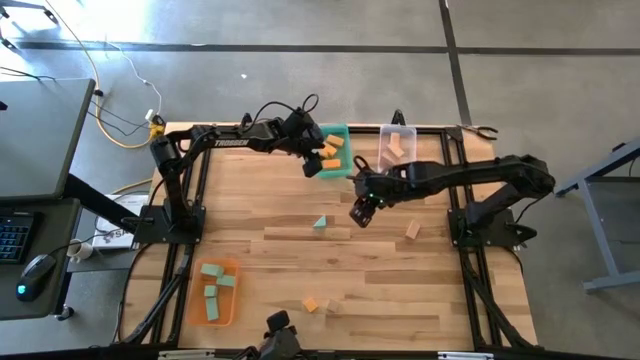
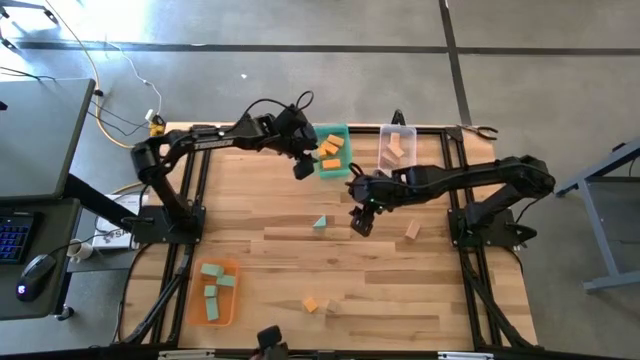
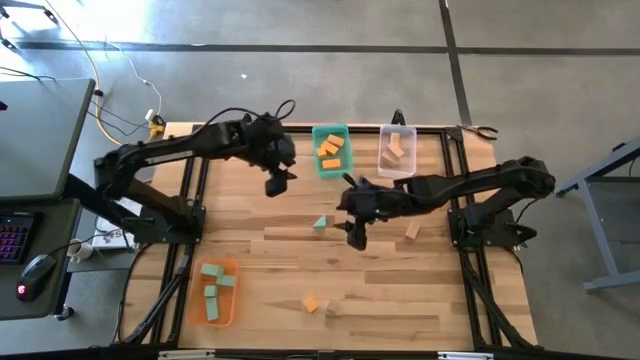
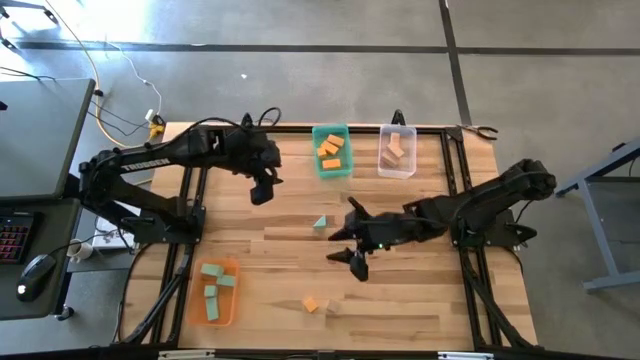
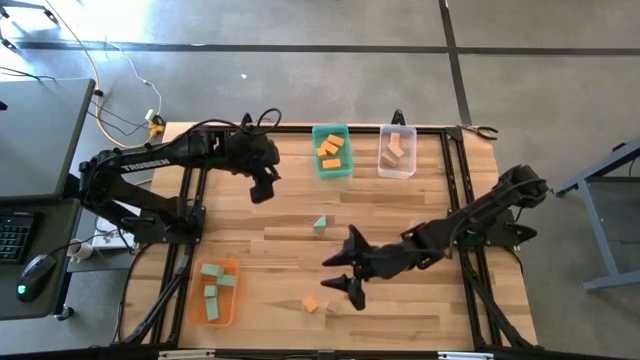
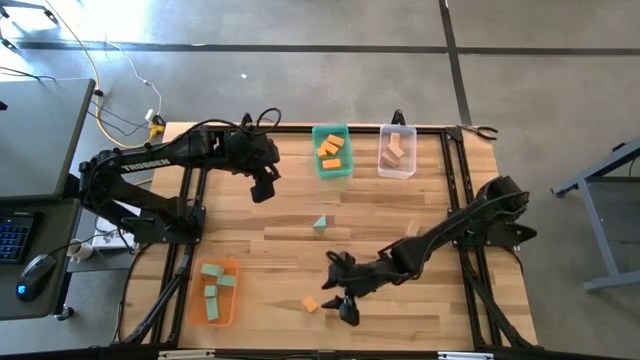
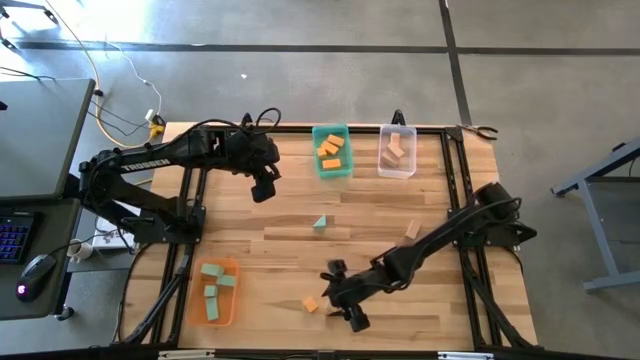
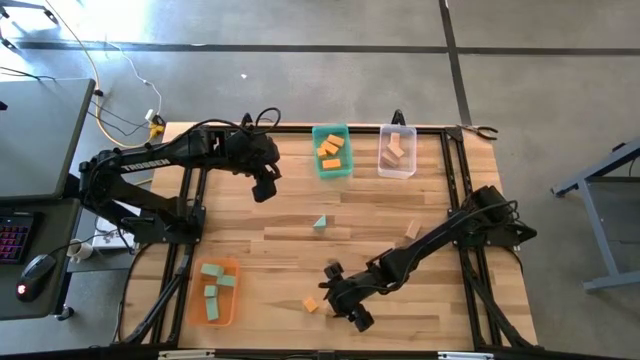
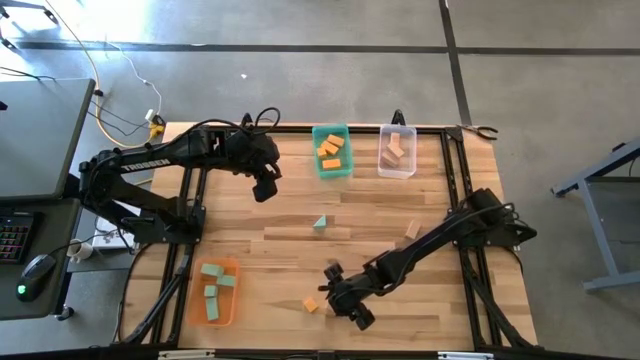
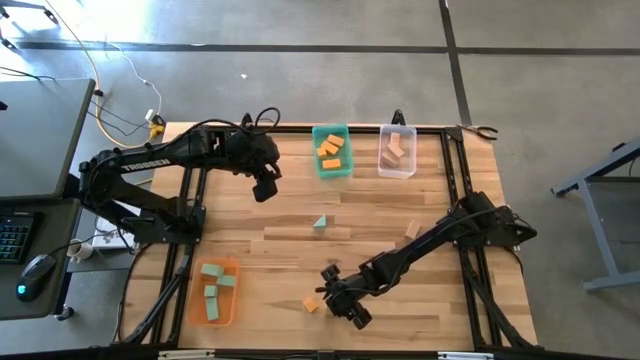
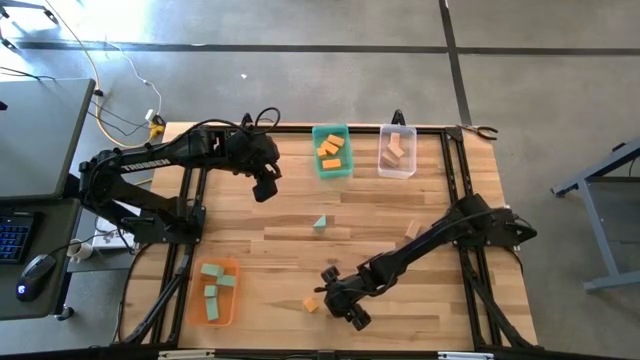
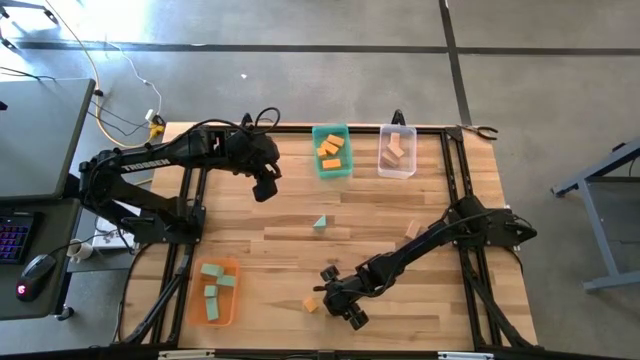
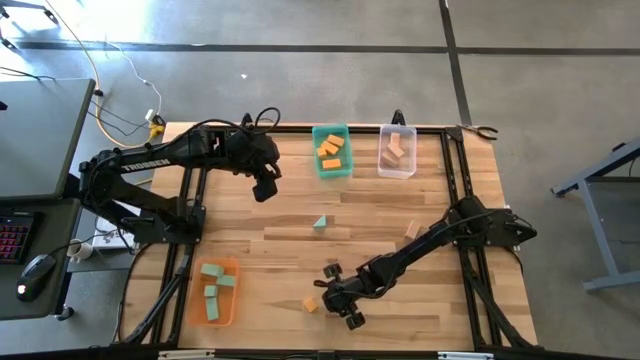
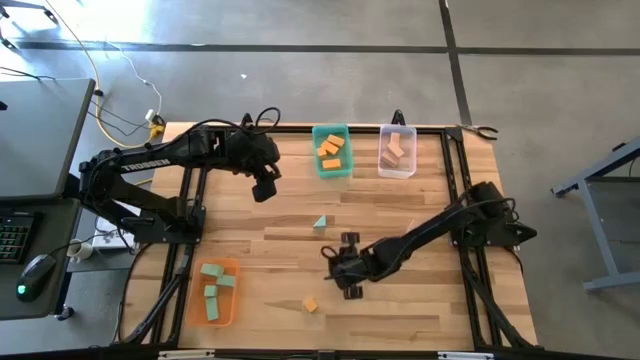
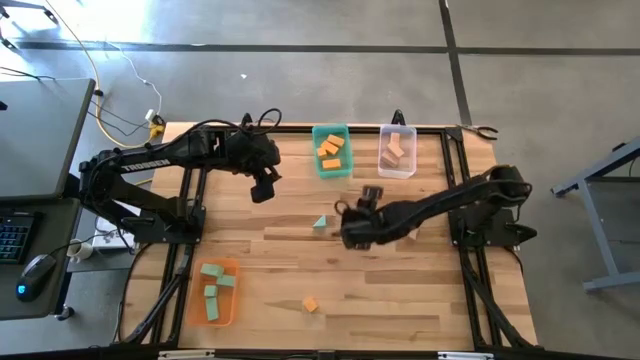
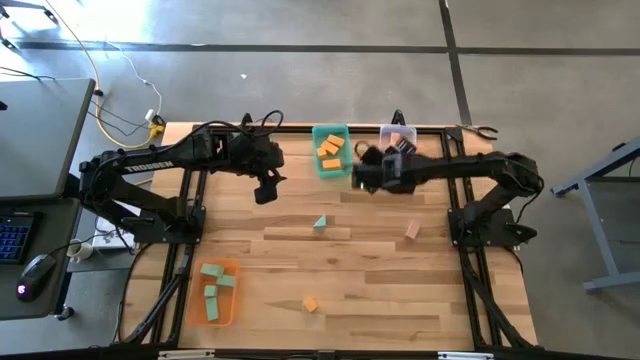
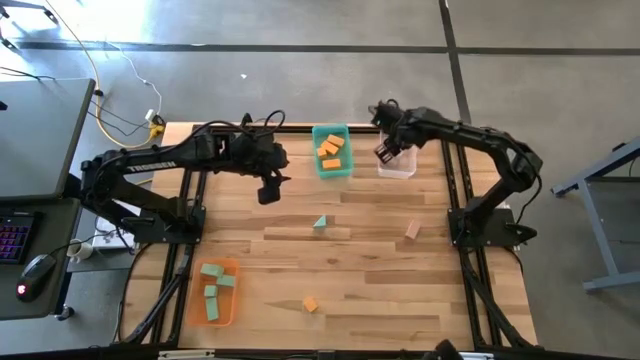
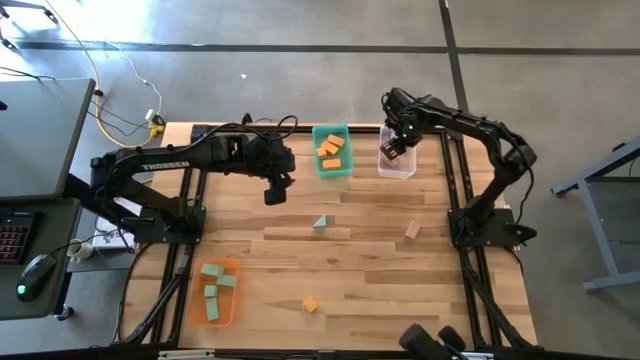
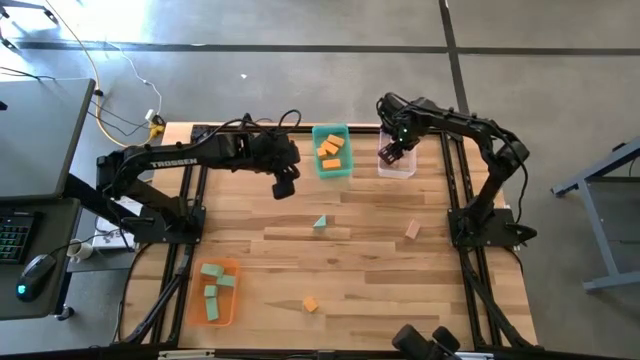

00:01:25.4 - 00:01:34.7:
Task: Sort & place blocks by color
Put the brown block into the transparent bin

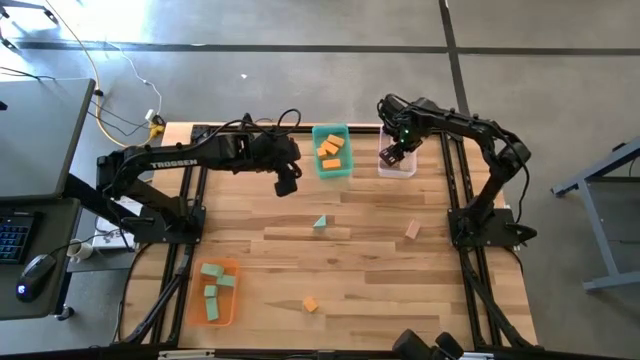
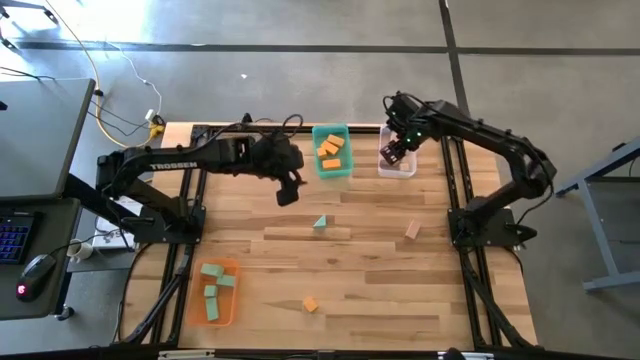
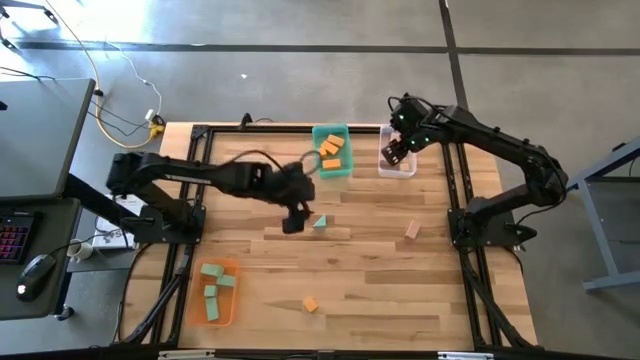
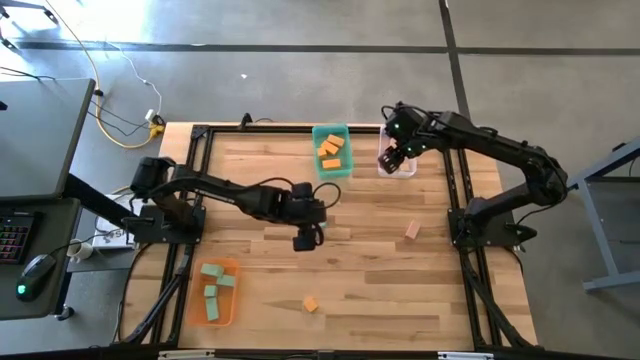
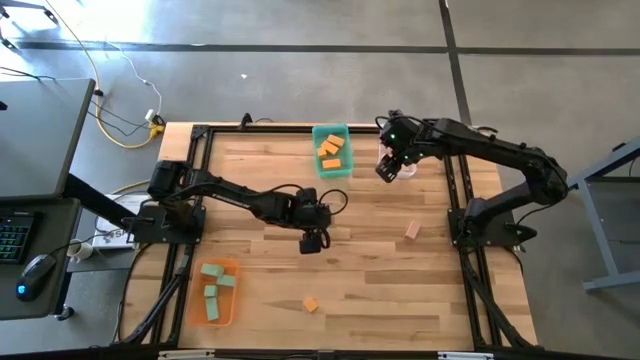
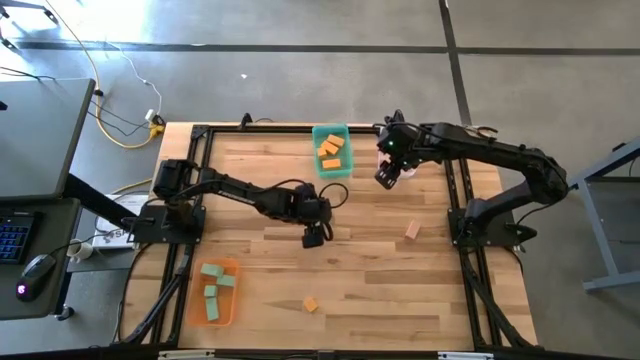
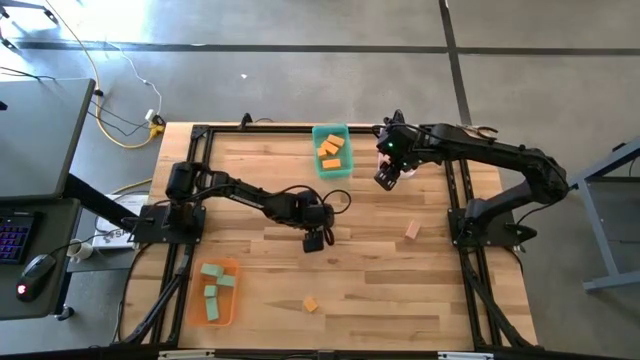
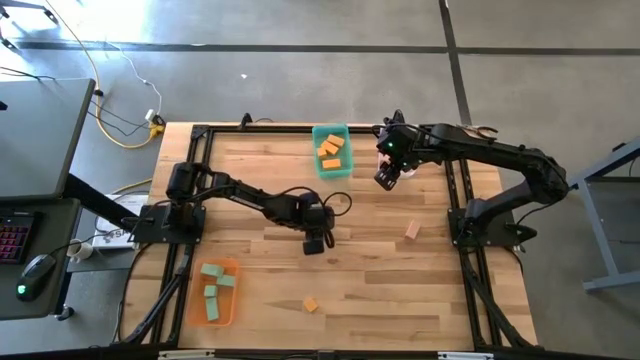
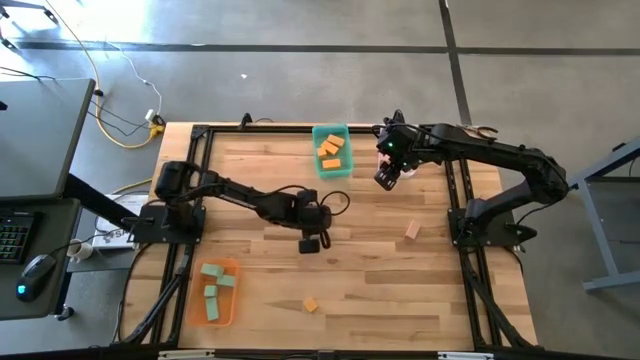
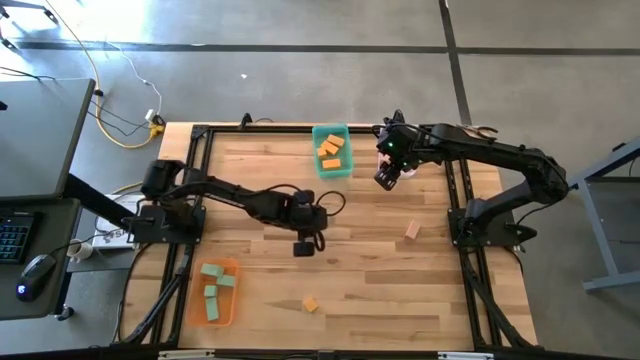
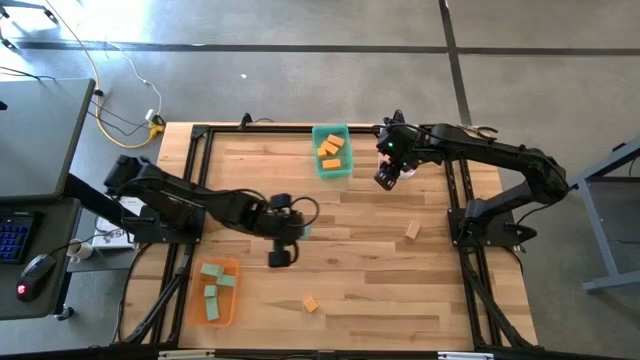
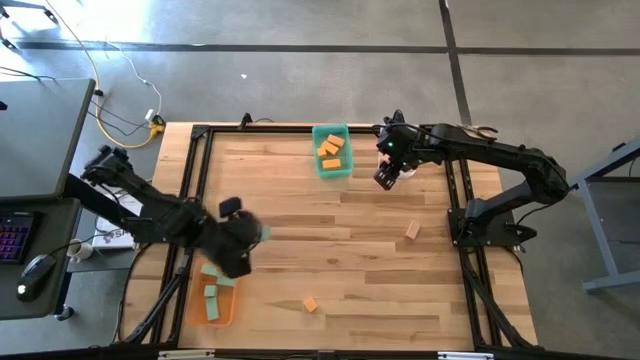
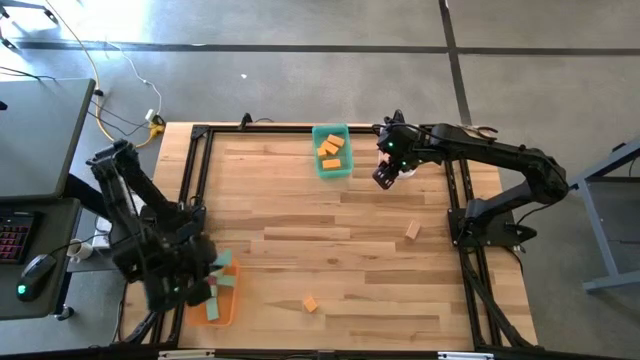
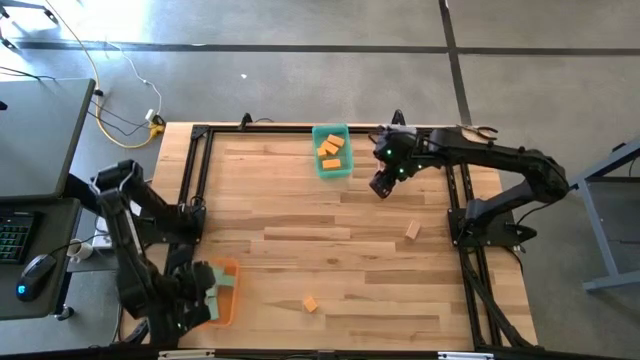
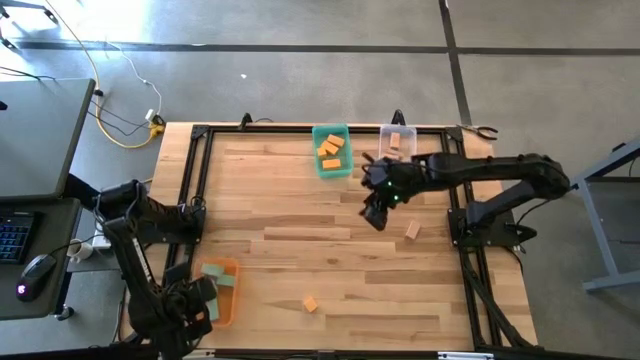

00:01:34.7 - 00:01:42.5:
Put the light blue block into the orange bin

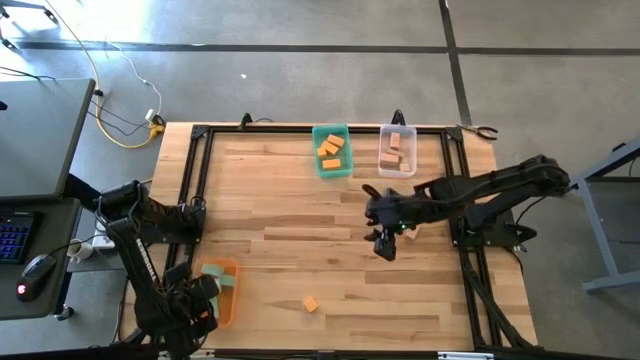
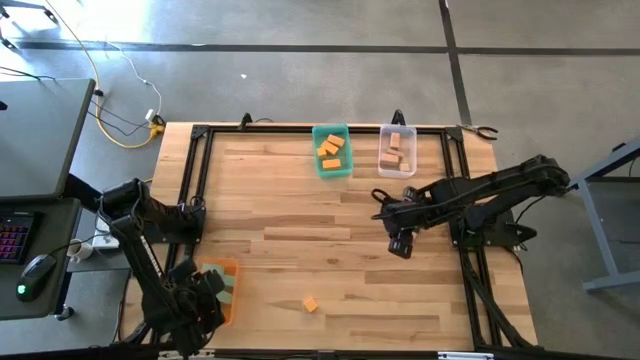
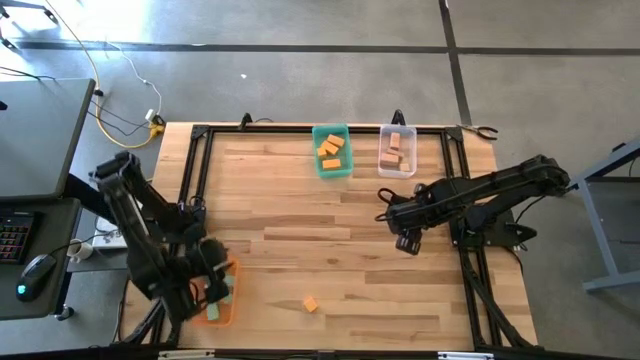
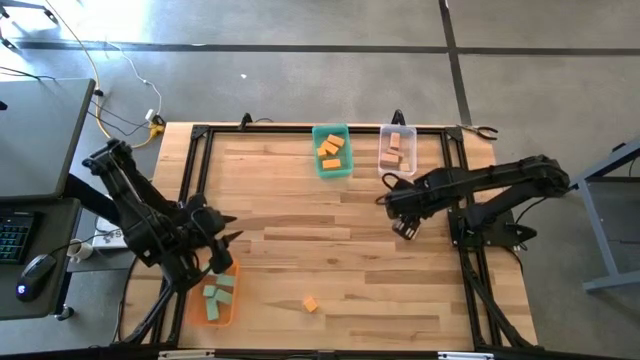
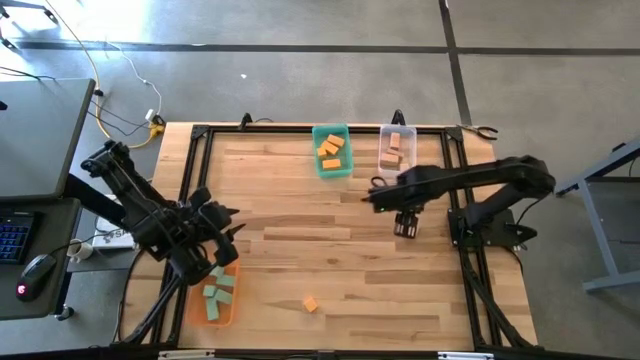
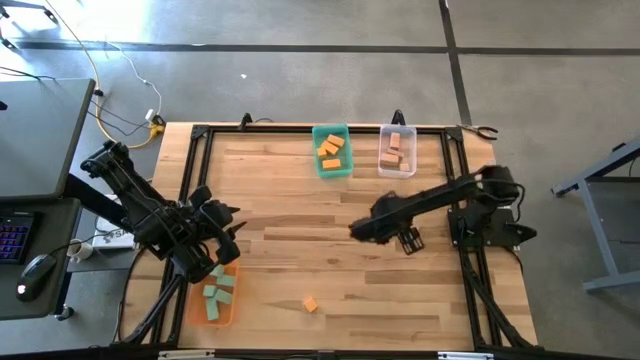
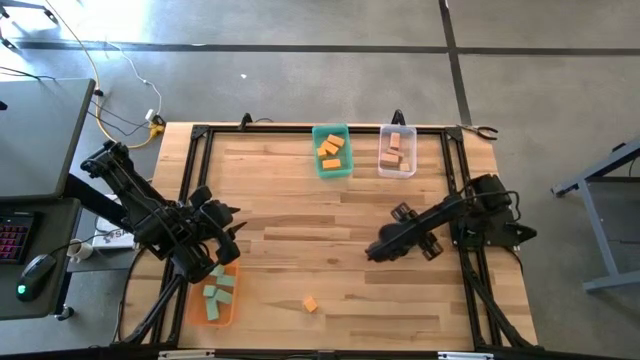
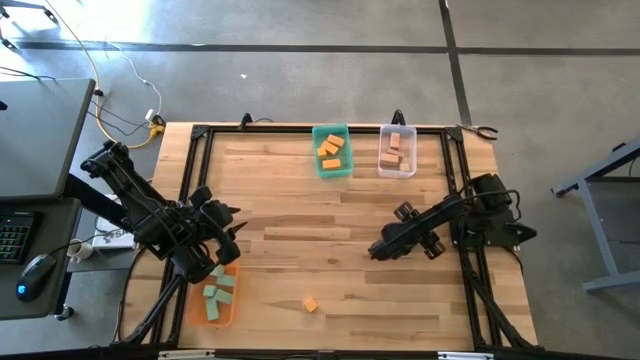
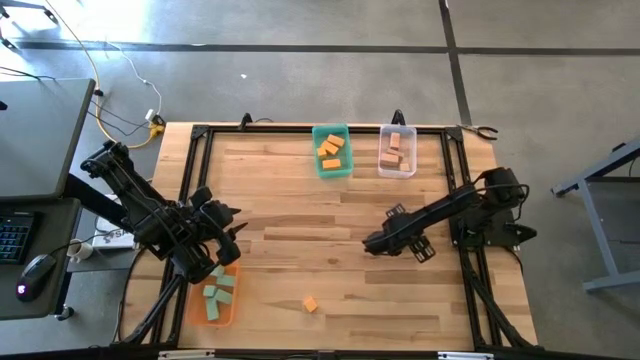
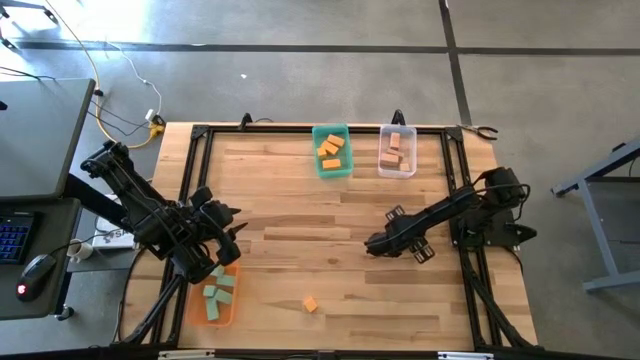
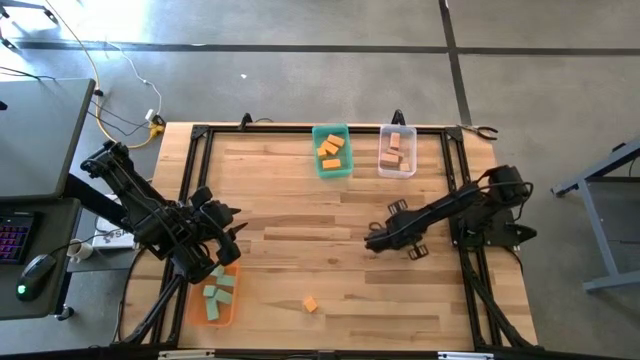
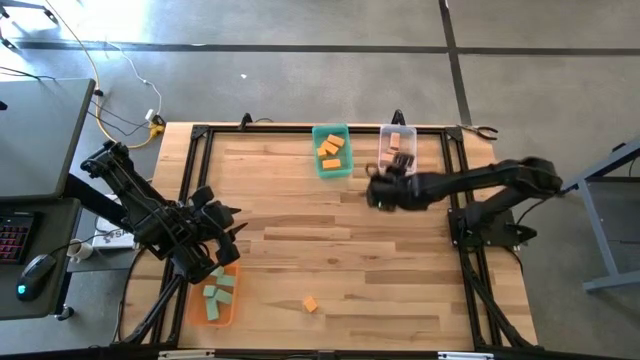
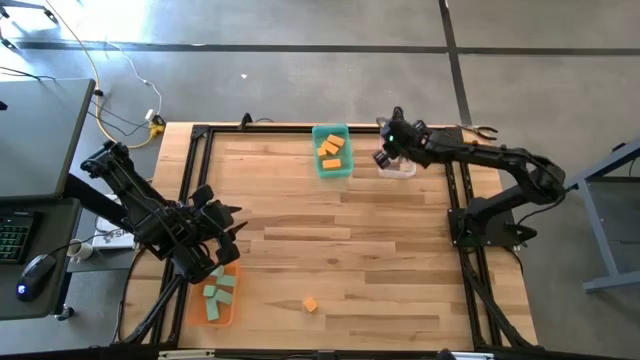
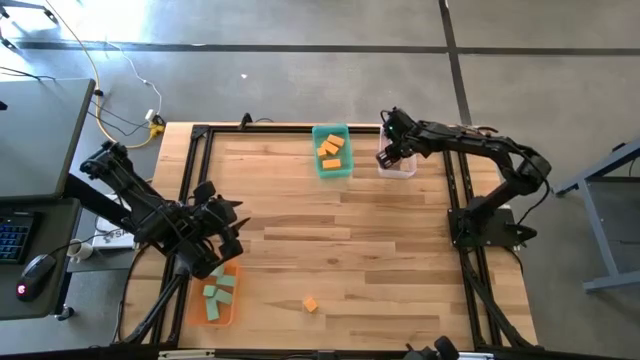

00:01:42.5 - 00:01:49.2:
Put the brown block into the transparent bin
